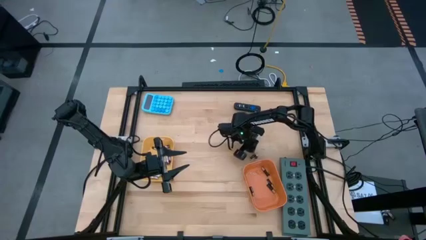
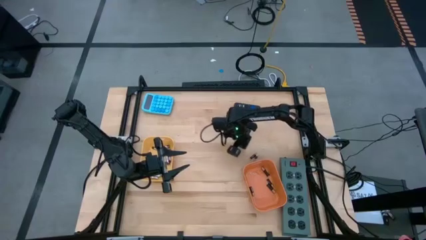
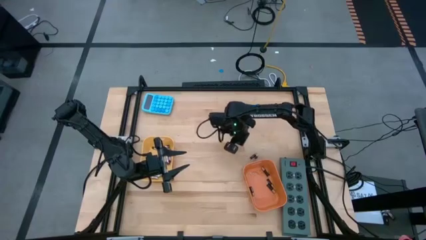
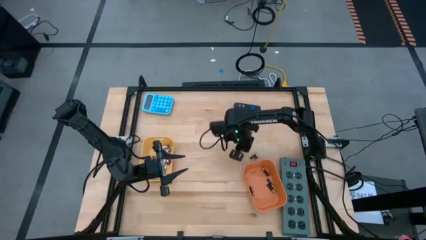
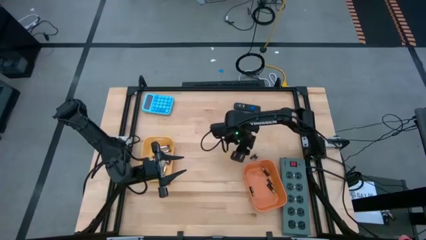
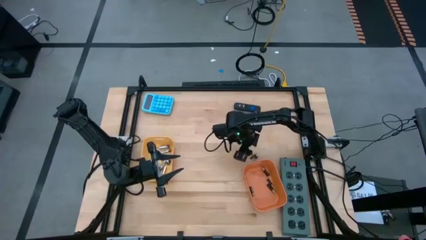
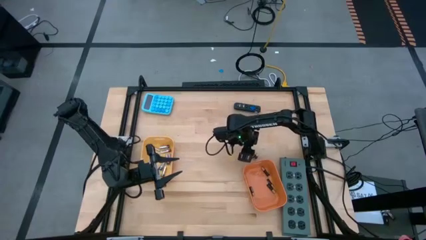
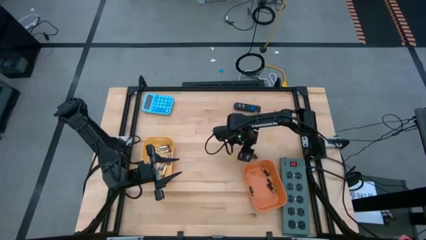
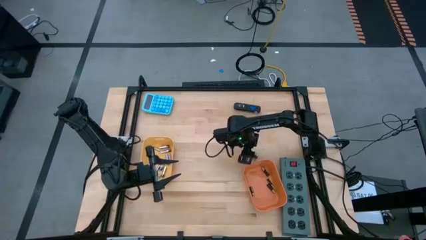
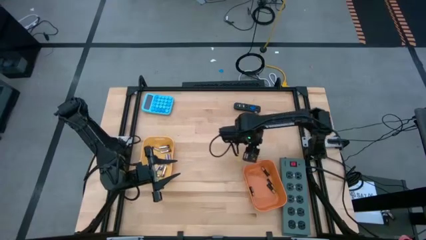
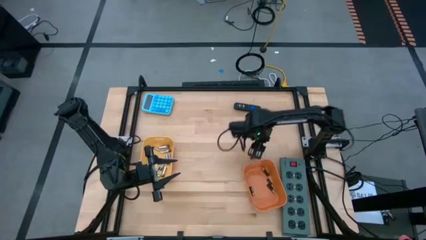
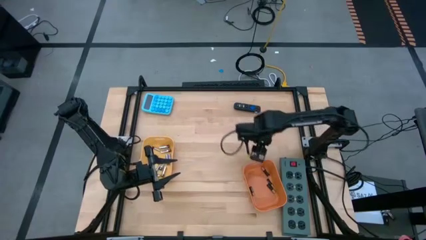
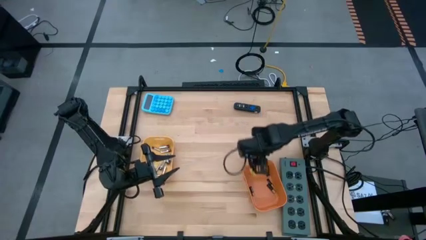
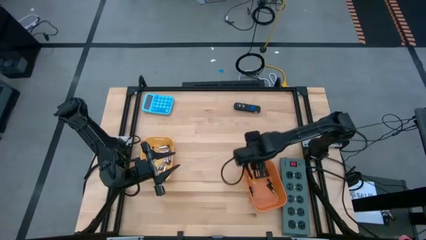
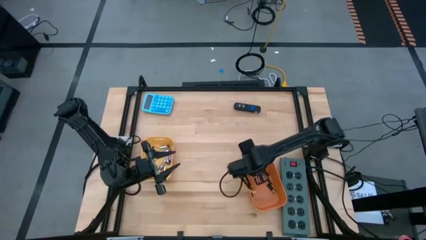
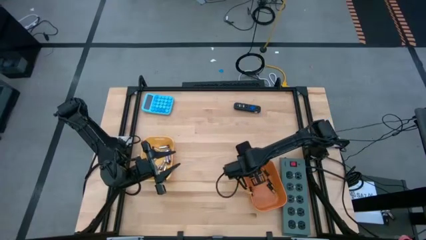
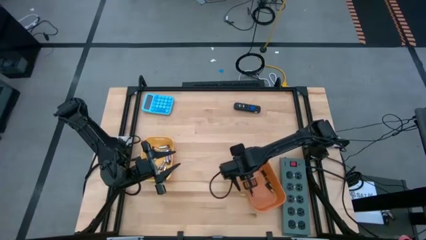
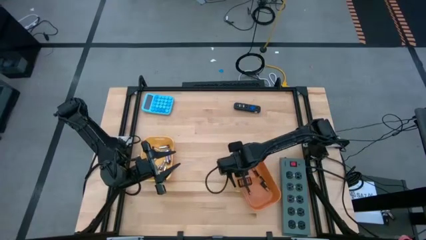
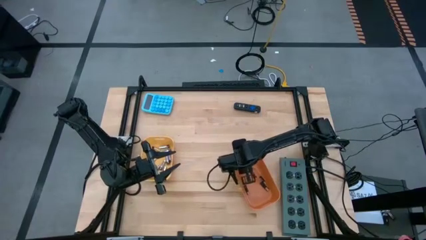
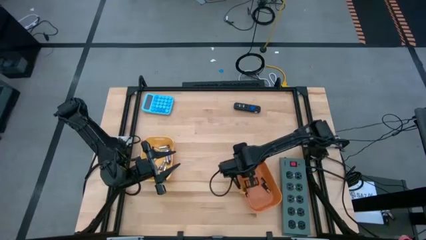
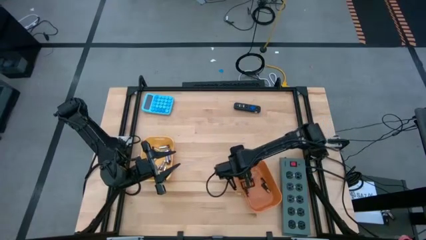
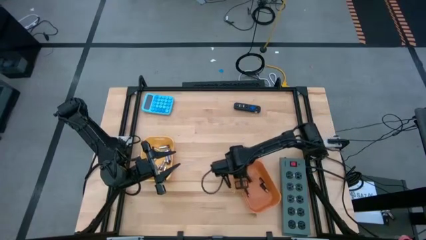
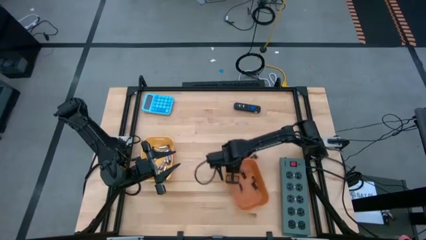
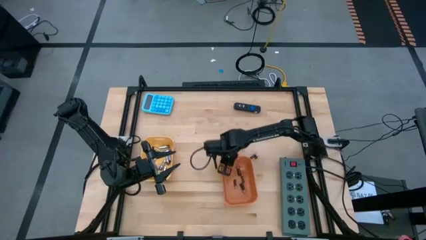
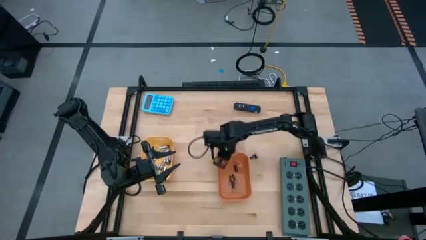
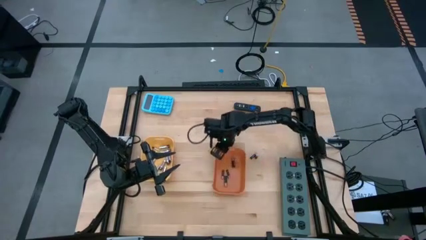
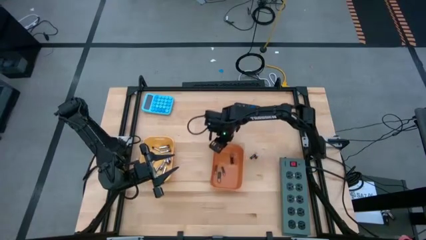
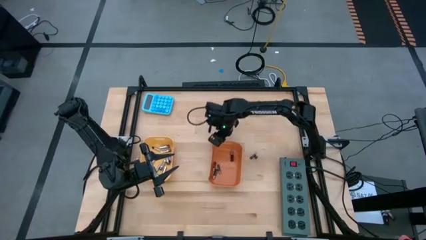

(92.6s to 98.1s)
Task: Sort batteries
Move the orange bin to the center of the table

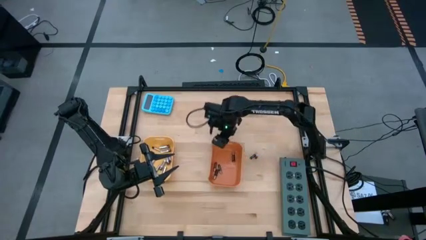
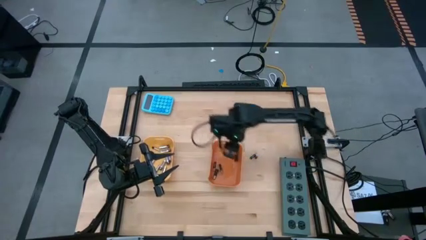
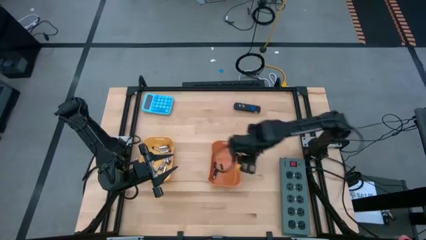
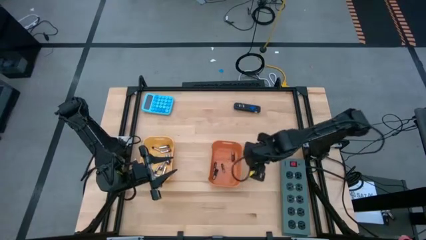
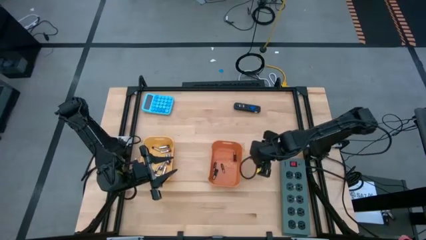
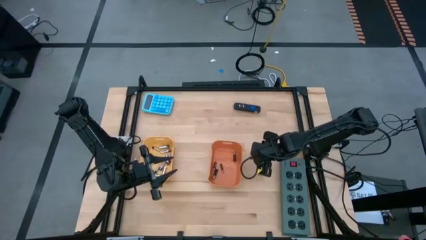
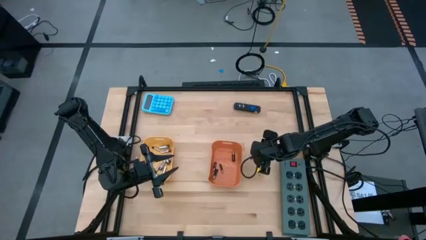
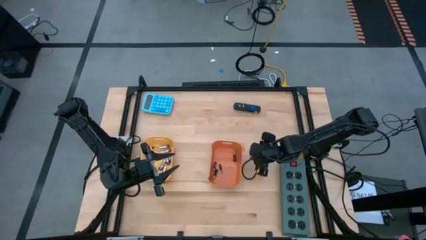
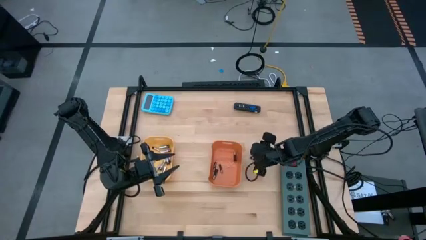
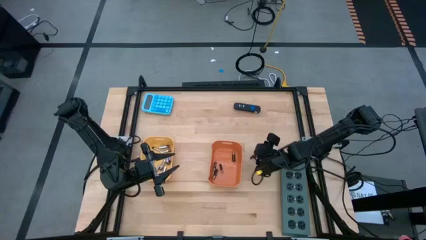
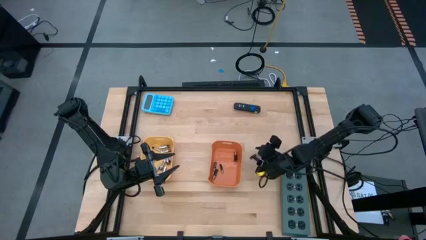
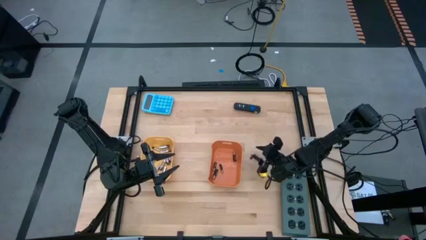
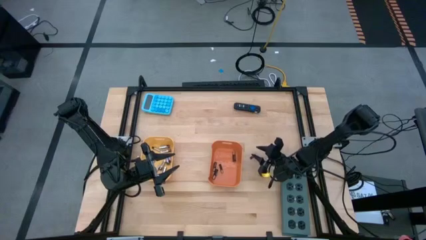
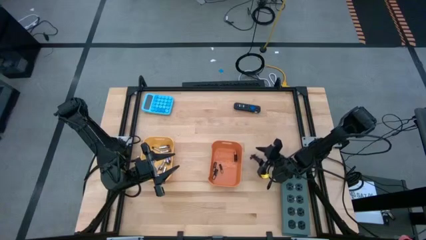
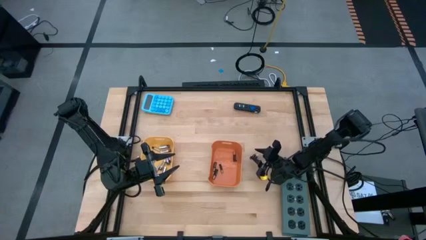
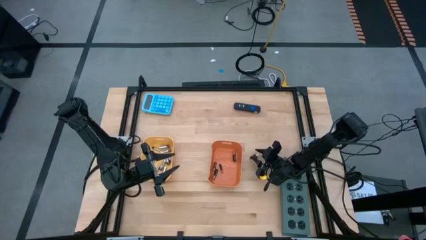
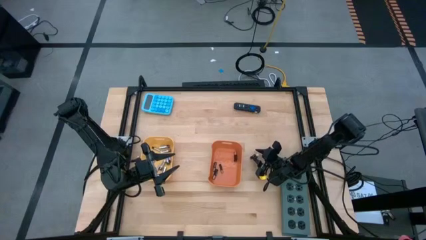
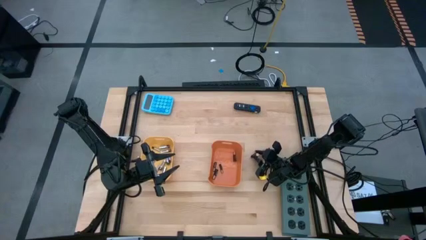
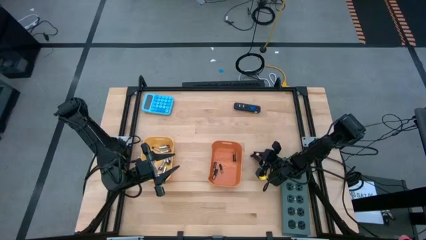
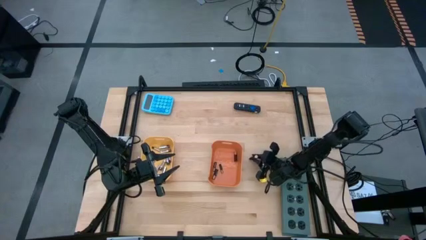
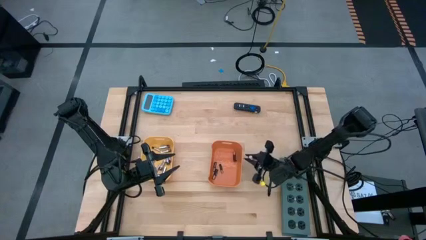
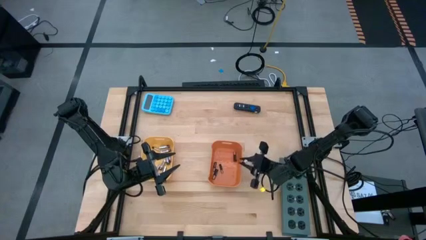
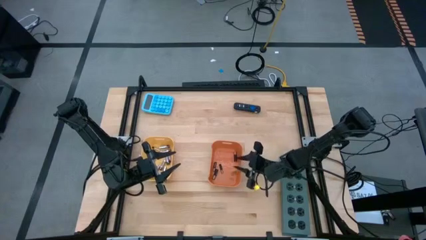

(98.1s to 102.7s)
Put the black battery into the orange bin

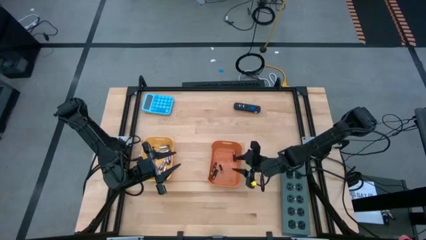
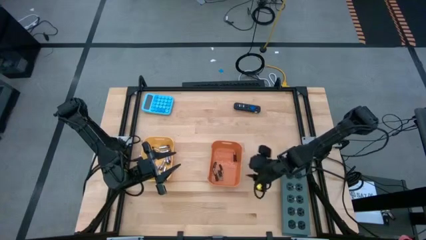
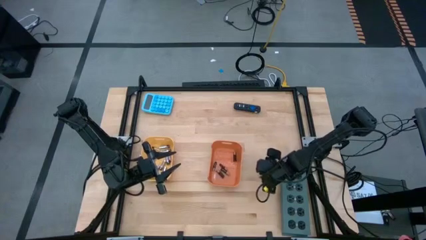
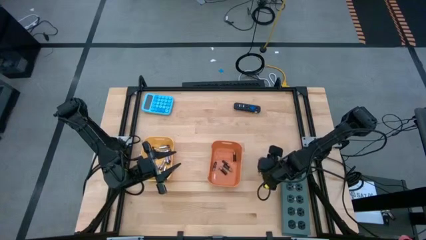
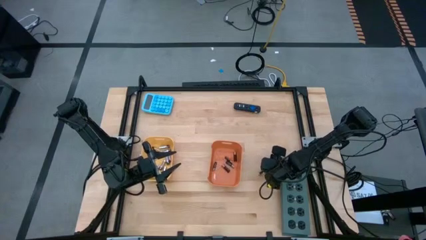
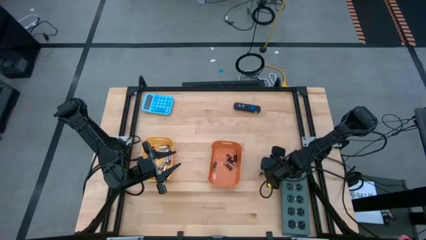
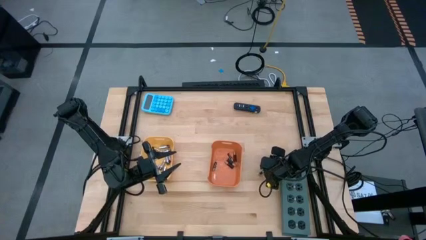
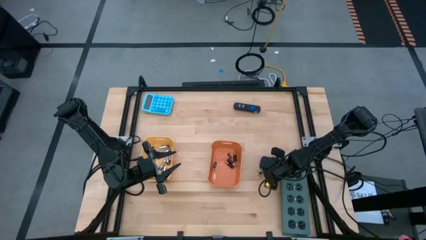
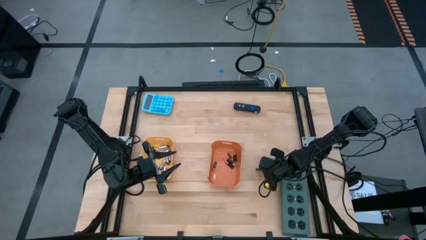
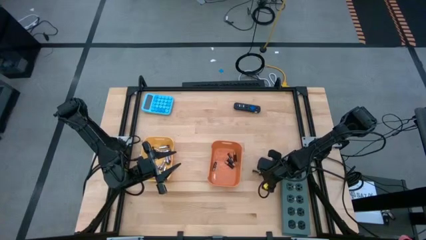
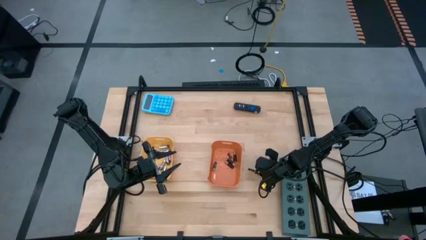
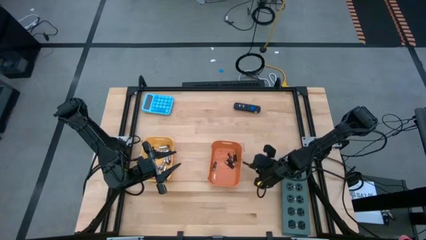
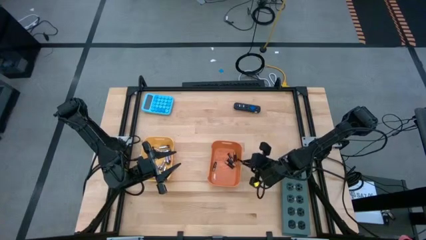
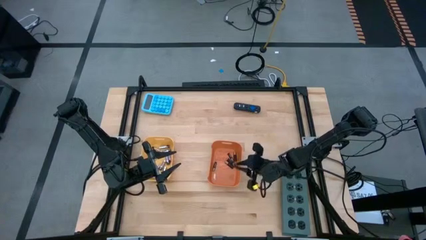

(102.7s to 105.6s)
Put the black battery into the orange bin

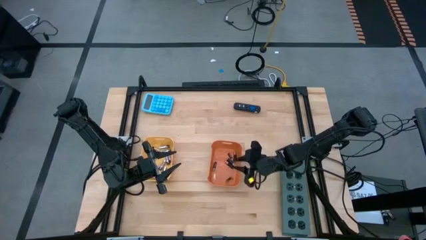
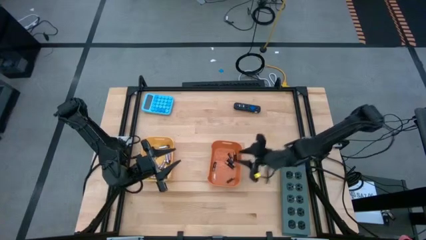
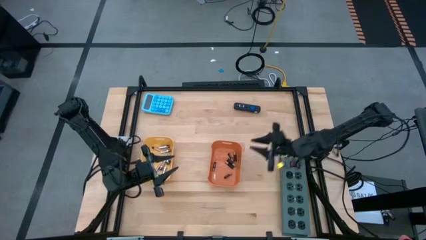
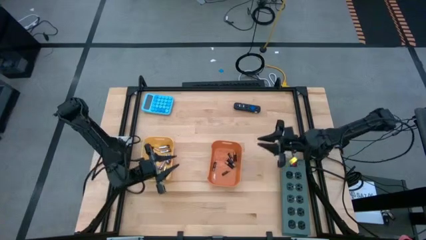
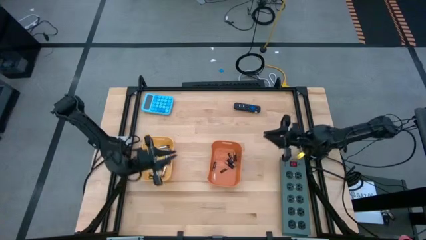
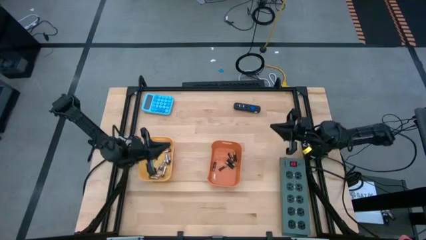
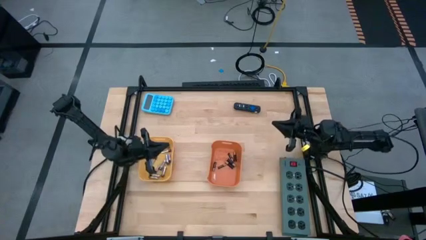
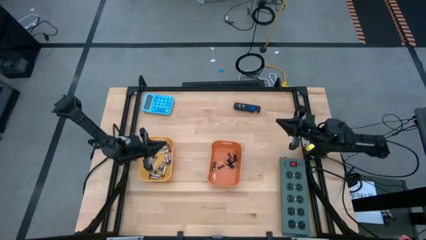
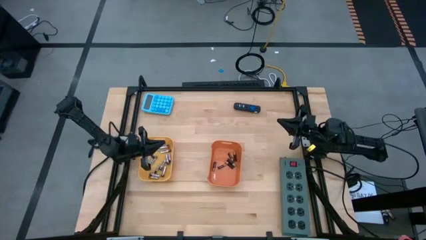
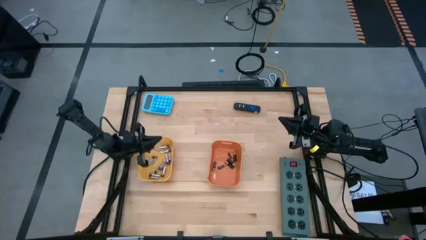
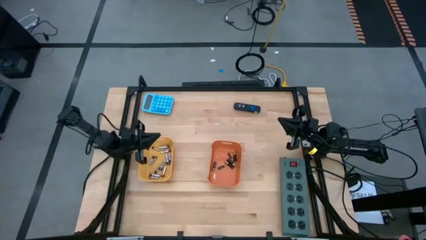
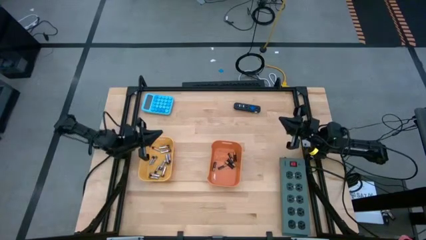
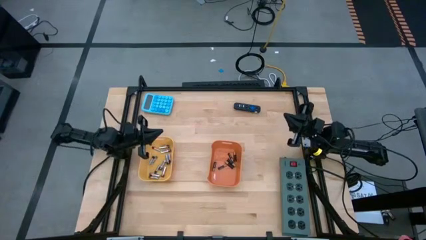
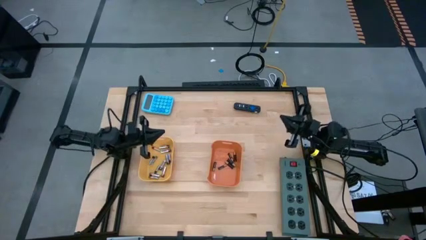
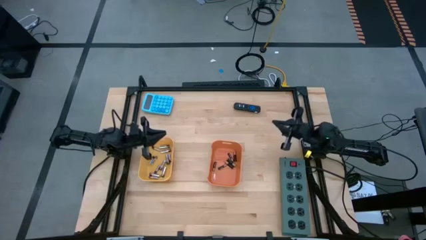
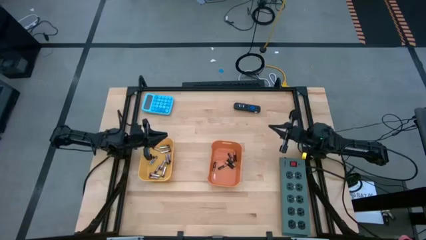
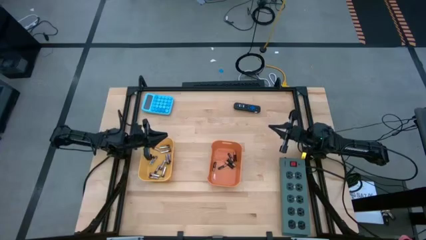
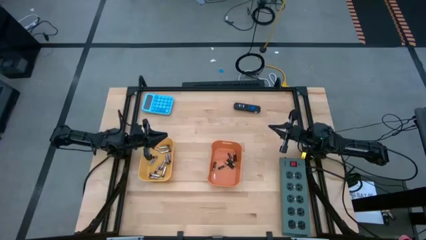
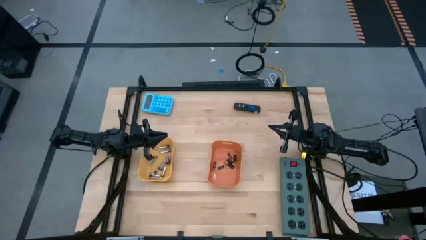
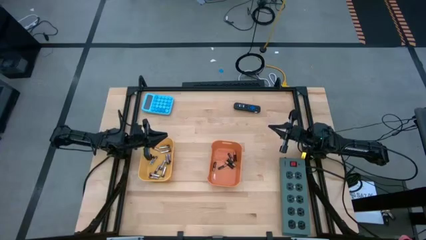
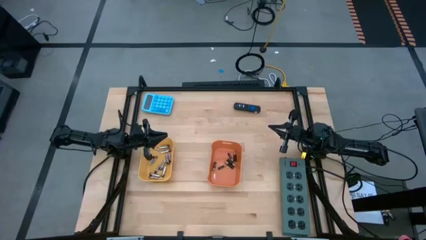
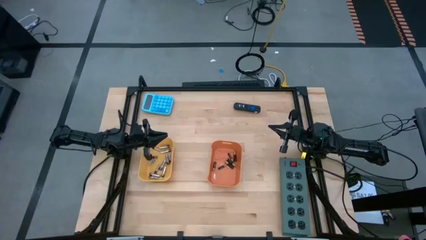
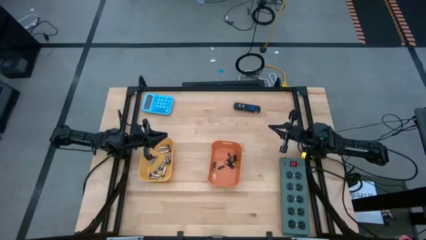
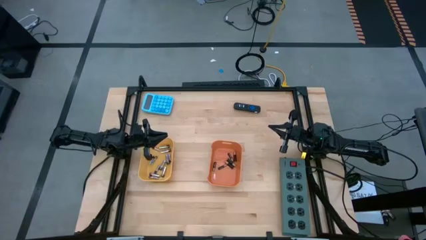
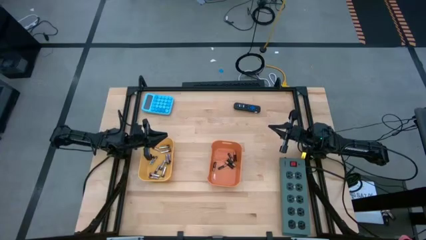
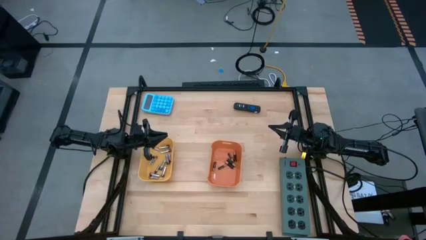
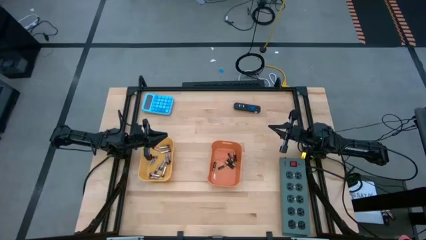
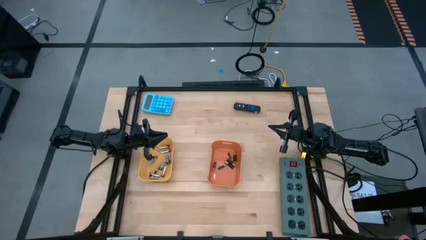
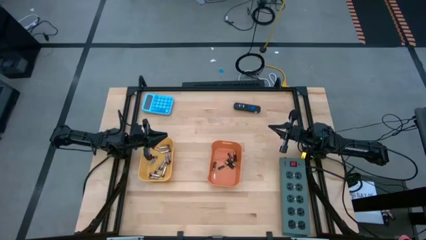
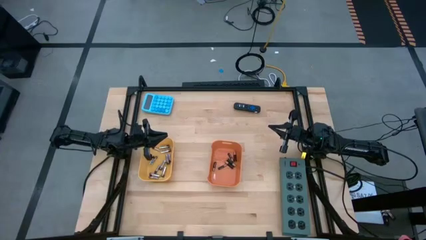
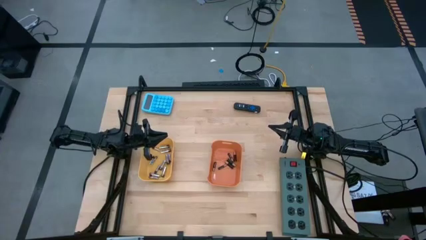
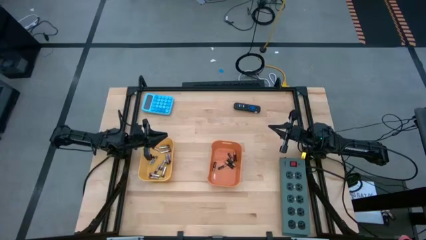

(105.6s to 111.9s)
Return to Home Position
